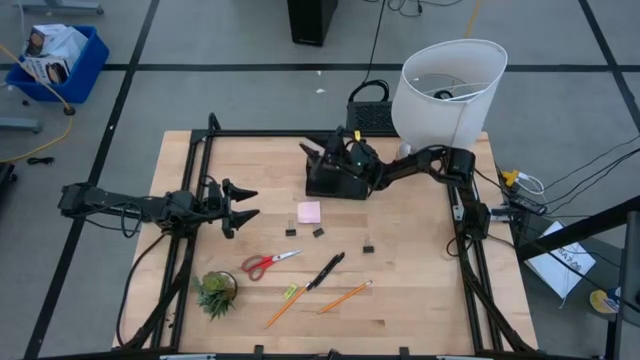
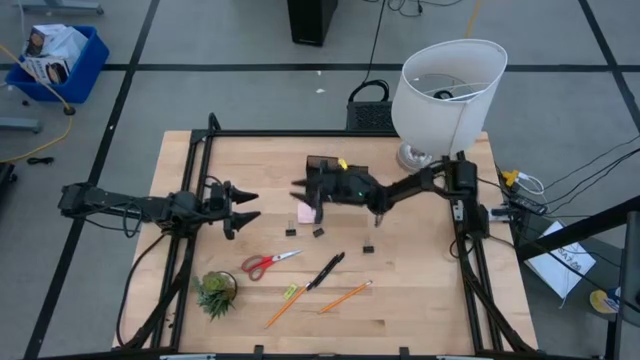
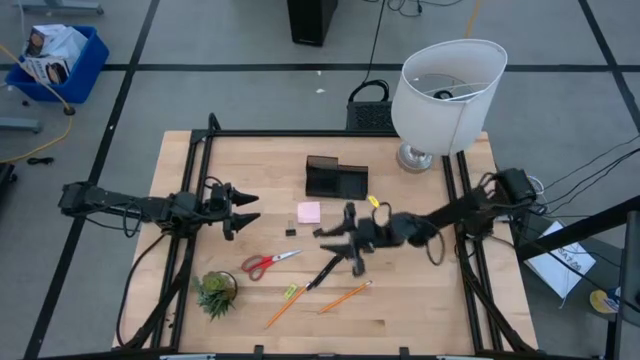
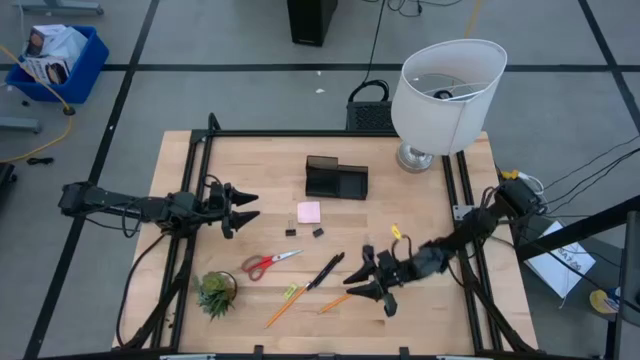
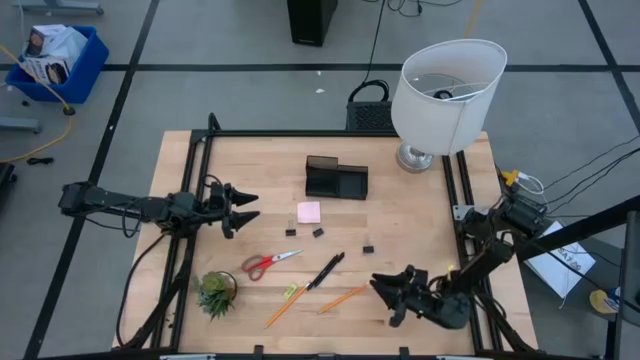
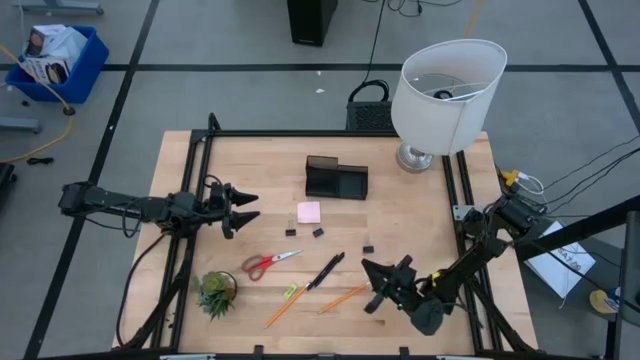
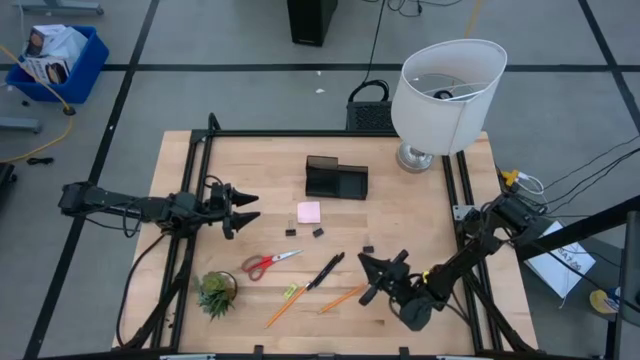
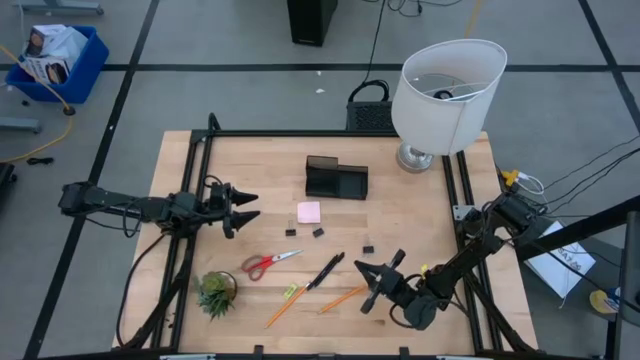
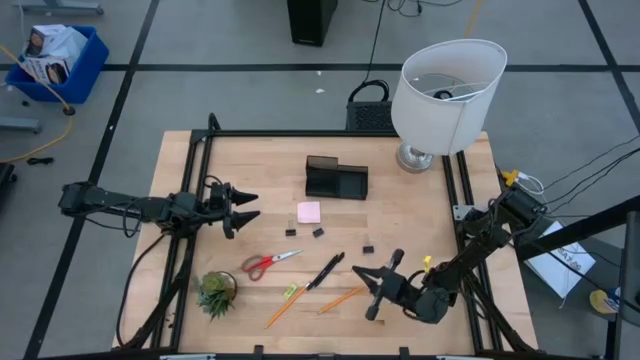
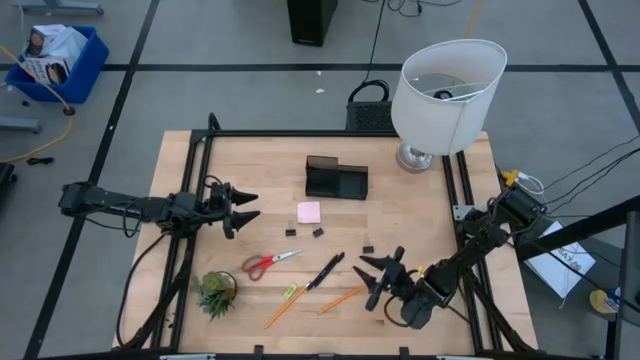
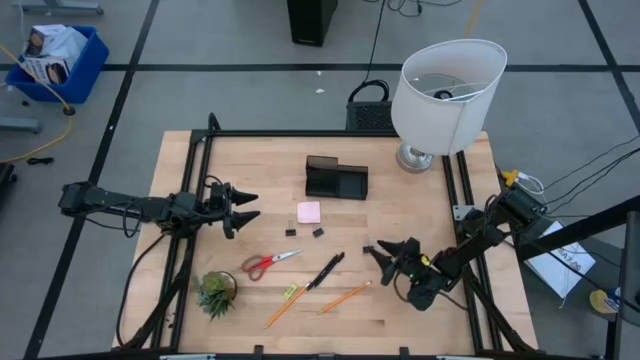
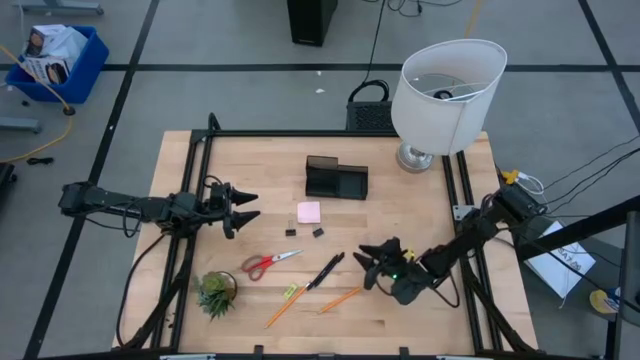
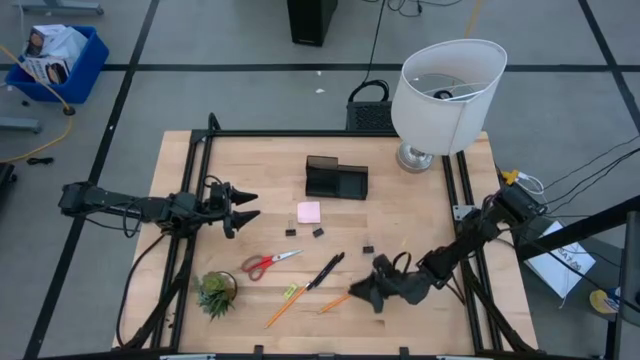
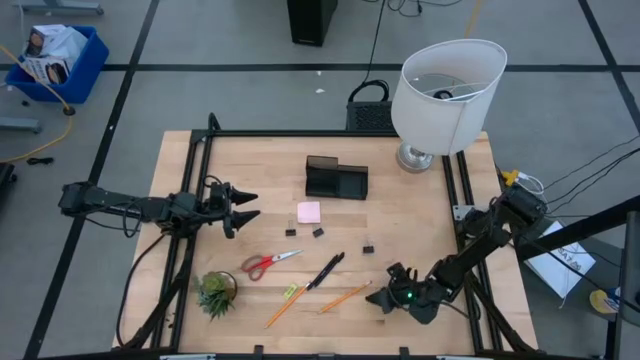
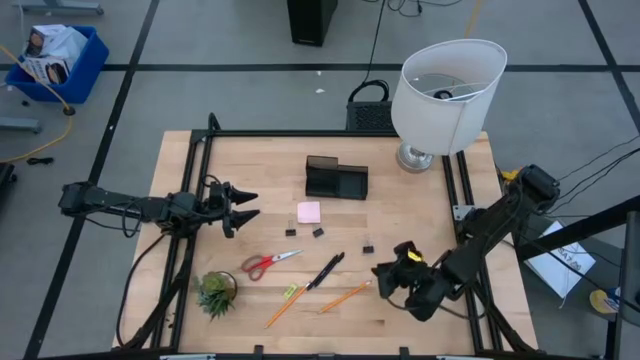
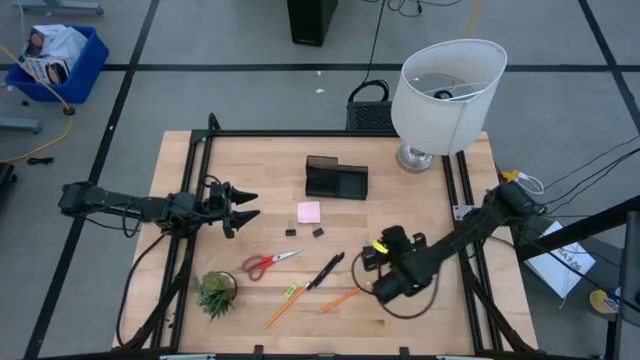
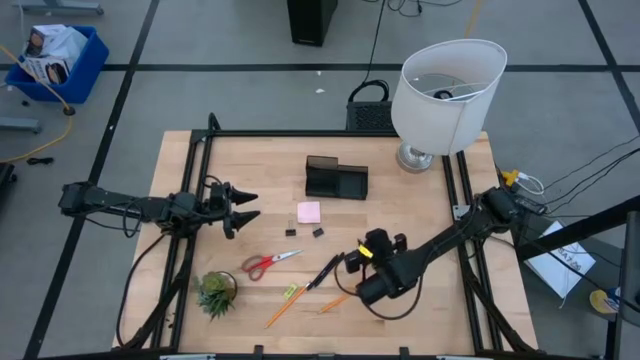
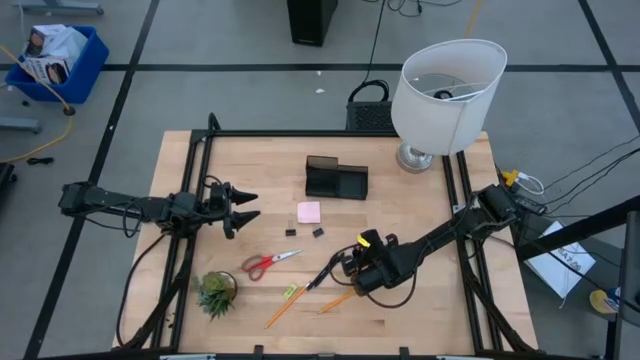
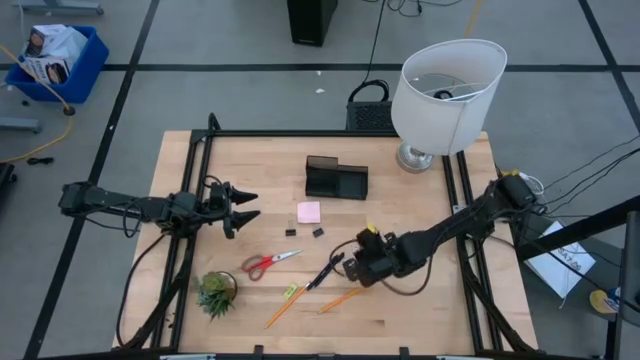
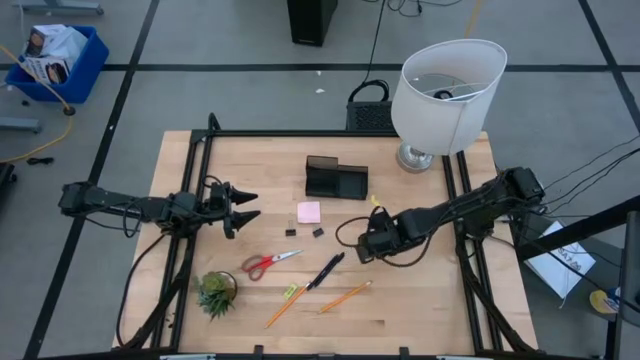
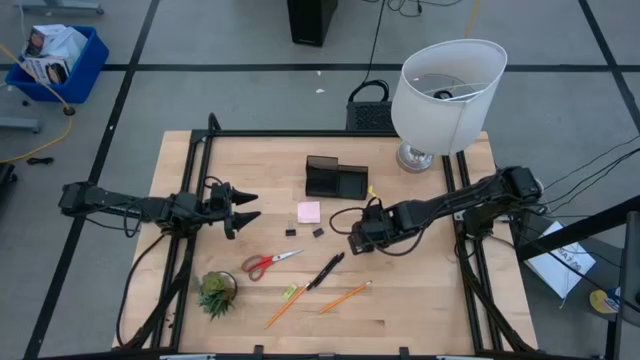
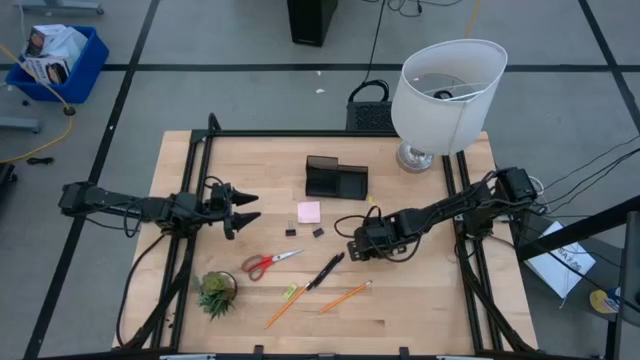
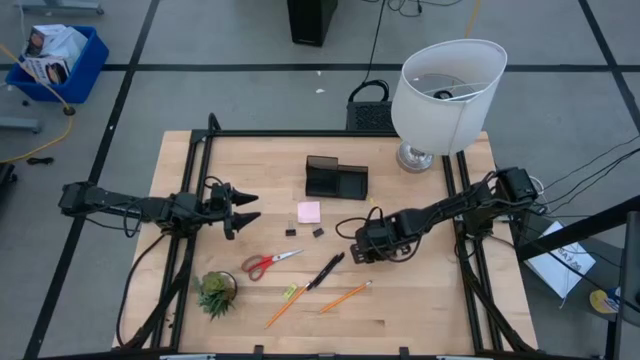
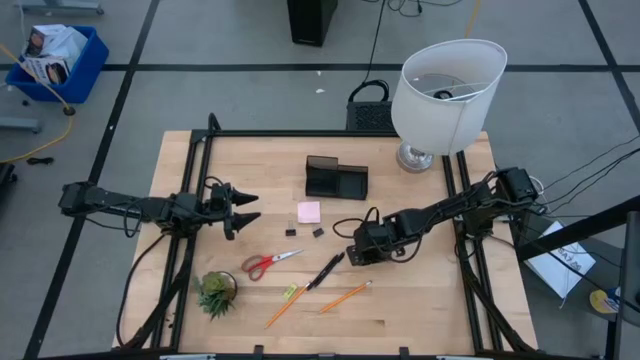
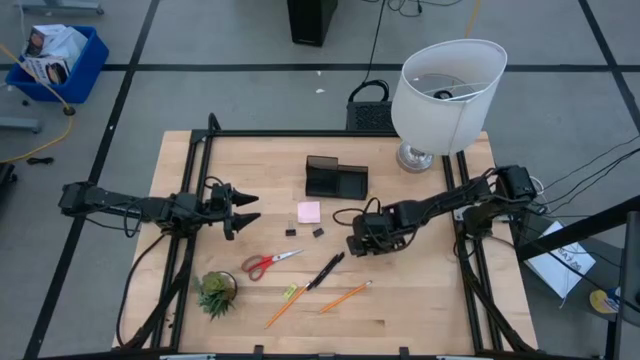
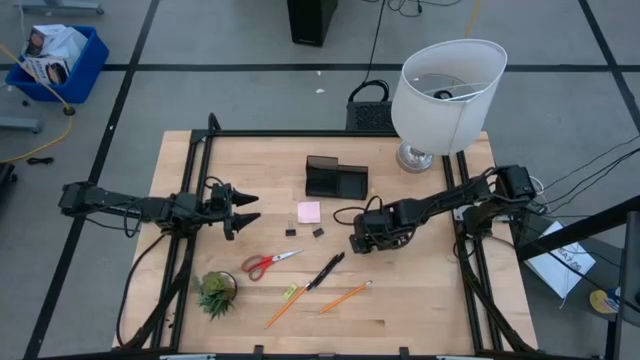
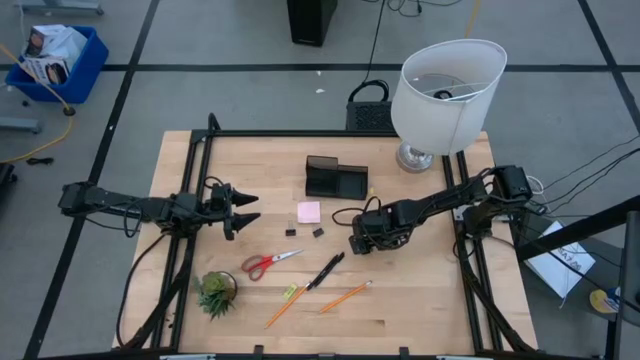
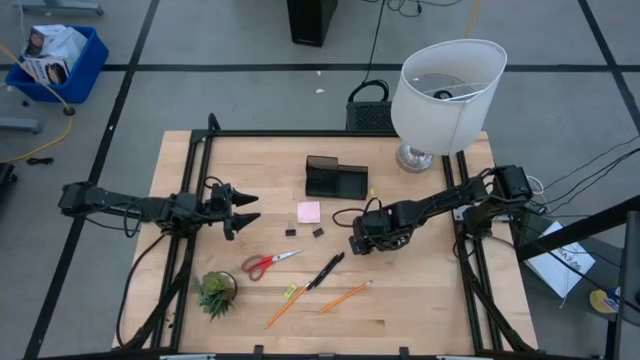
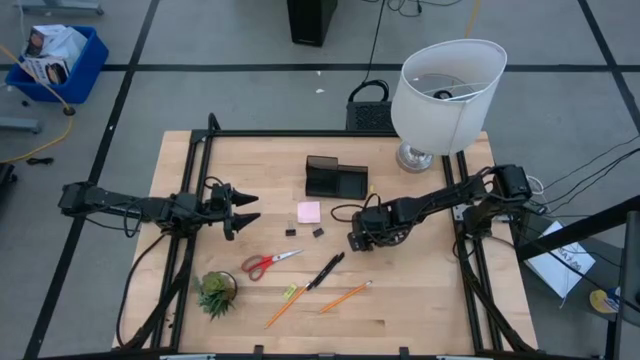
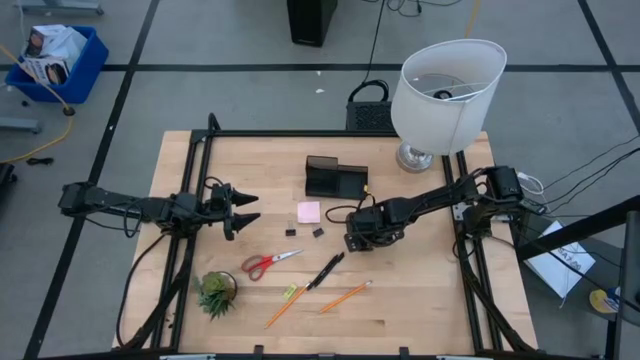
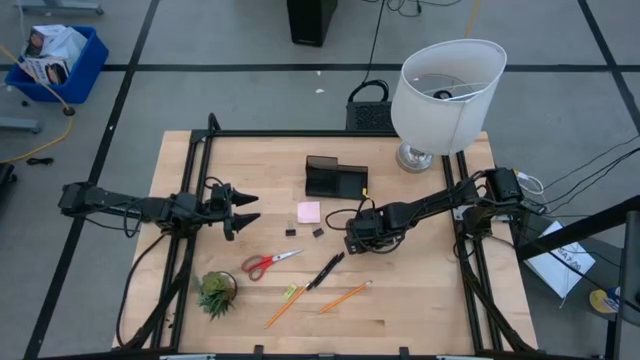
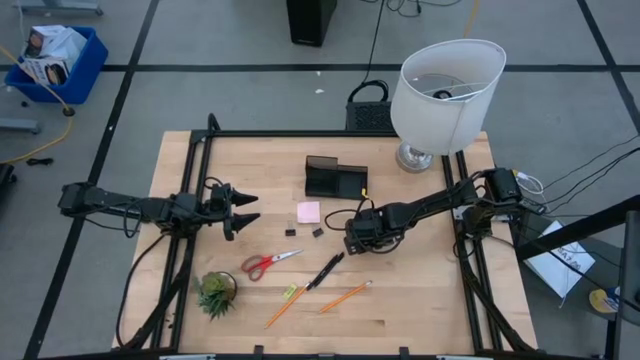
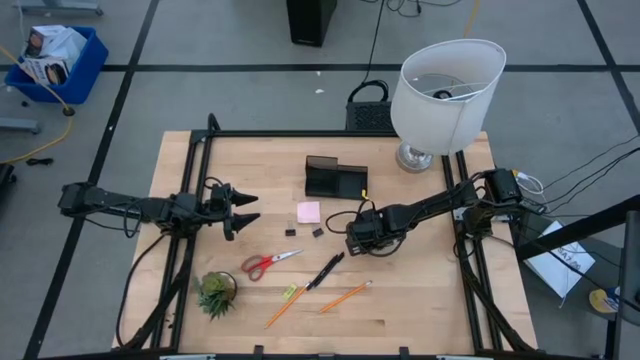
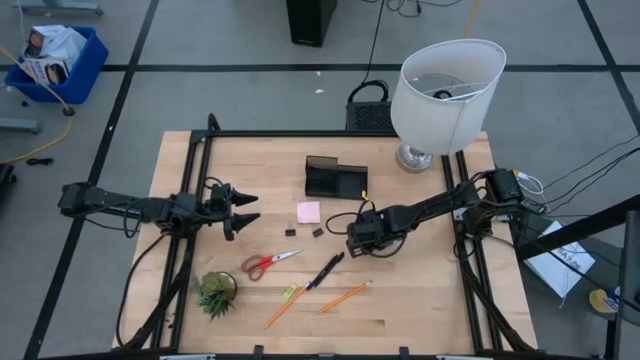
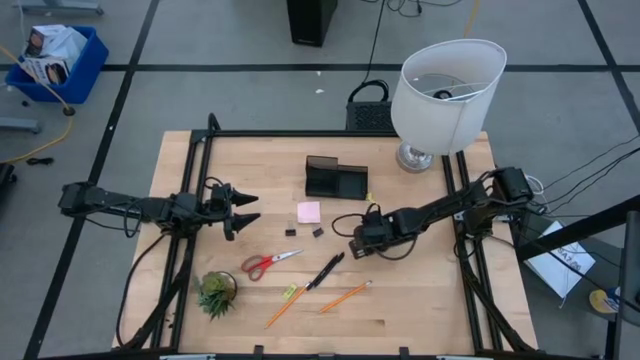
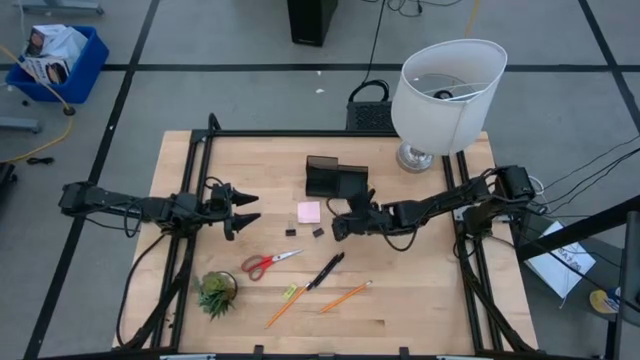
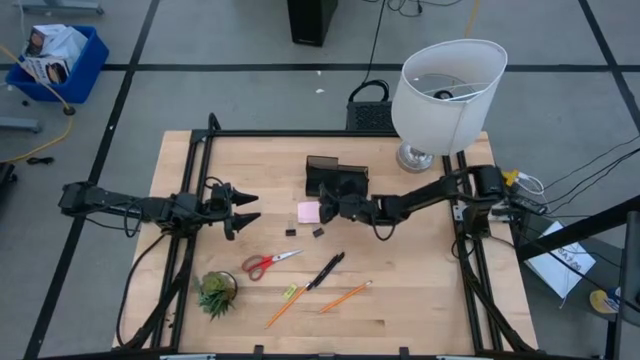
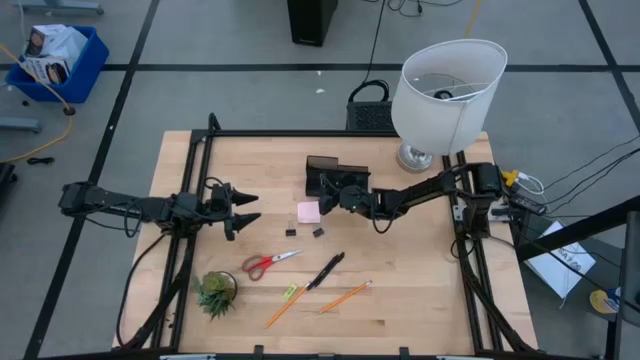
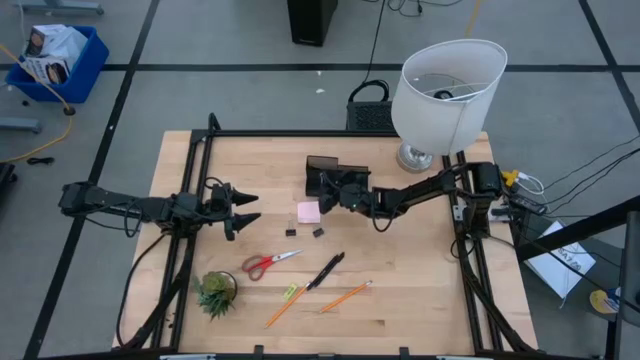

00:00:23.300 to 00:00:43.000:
Task: Pick and place office supplies into organizer
Put the right black paper clip into the desk organizer
